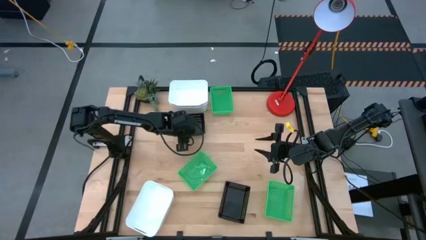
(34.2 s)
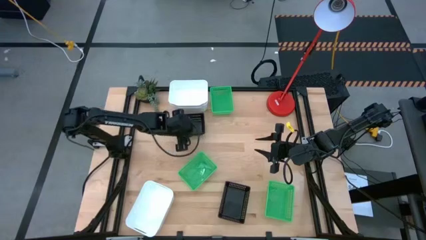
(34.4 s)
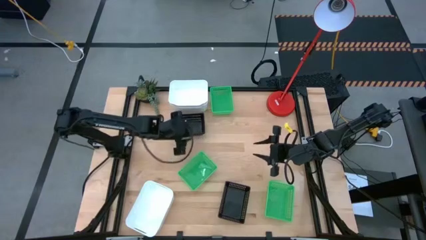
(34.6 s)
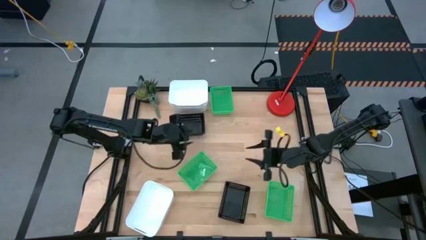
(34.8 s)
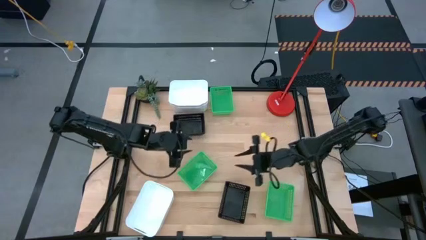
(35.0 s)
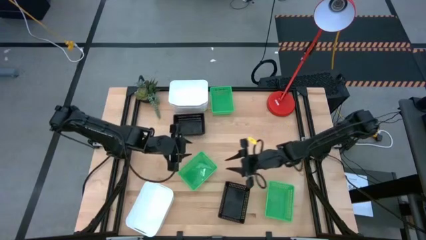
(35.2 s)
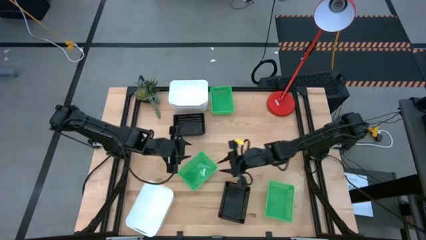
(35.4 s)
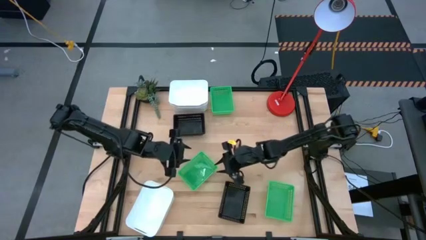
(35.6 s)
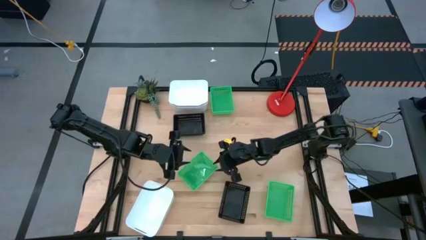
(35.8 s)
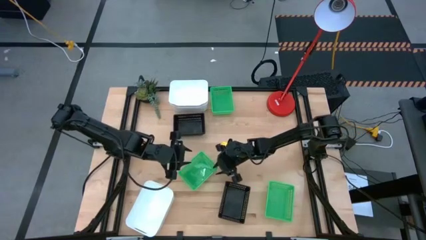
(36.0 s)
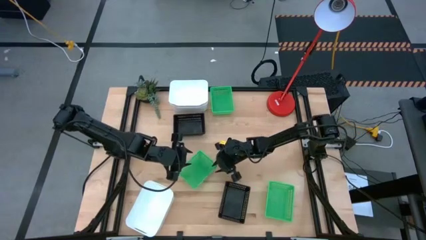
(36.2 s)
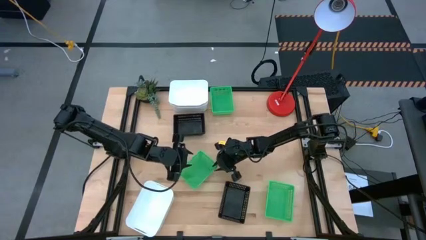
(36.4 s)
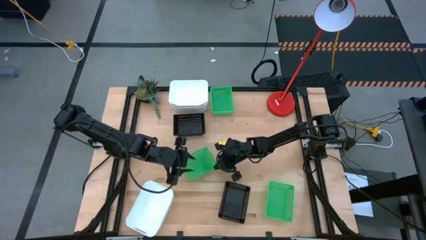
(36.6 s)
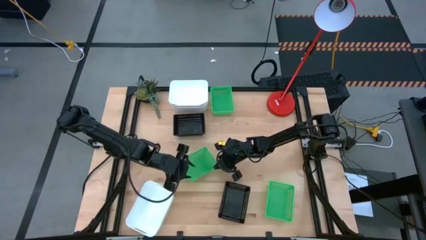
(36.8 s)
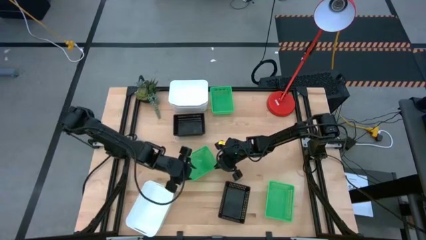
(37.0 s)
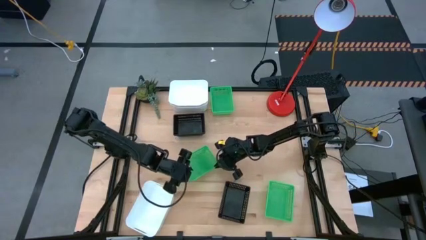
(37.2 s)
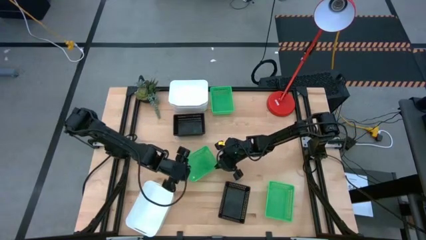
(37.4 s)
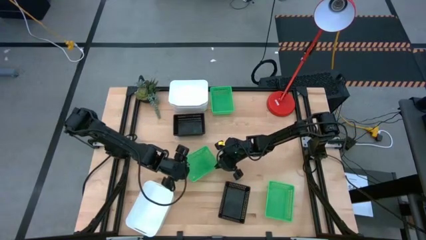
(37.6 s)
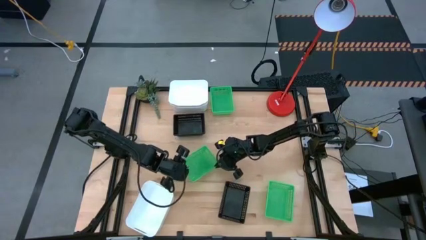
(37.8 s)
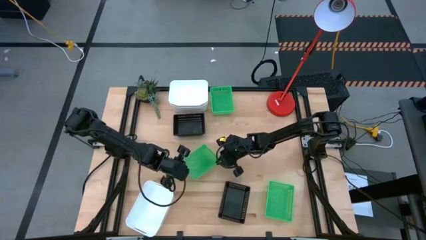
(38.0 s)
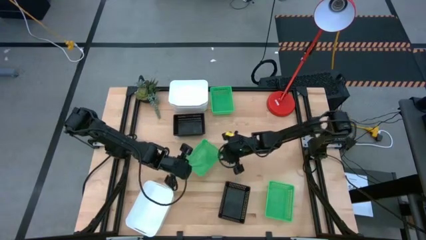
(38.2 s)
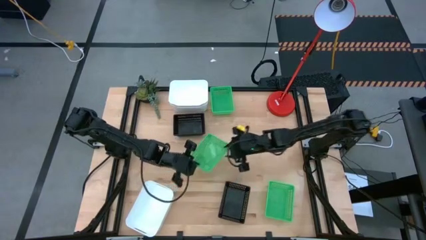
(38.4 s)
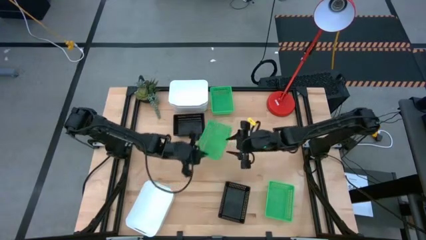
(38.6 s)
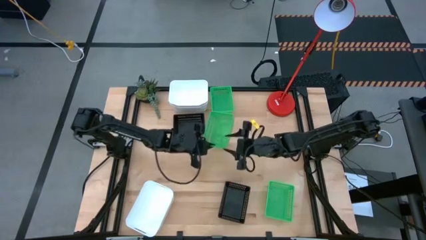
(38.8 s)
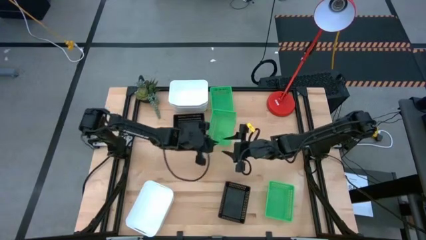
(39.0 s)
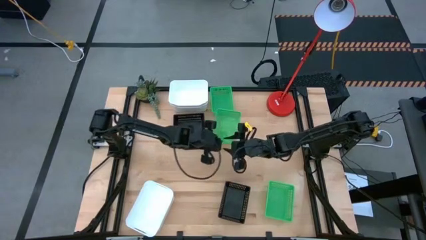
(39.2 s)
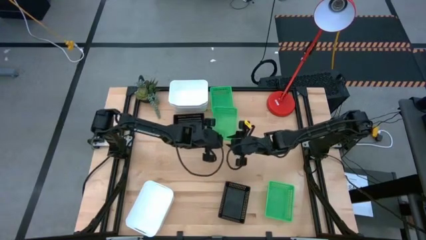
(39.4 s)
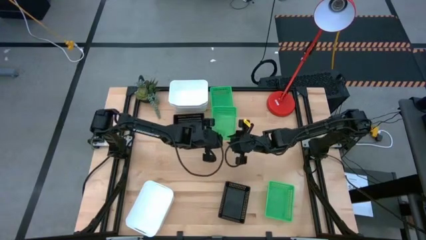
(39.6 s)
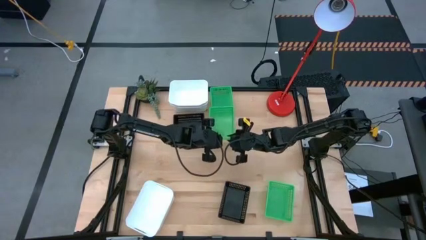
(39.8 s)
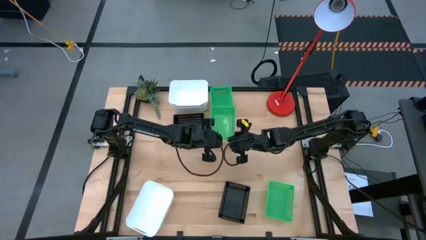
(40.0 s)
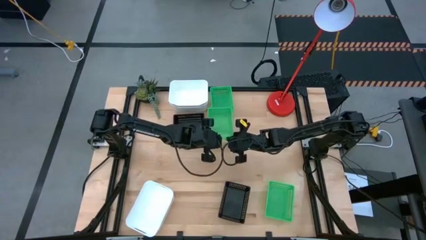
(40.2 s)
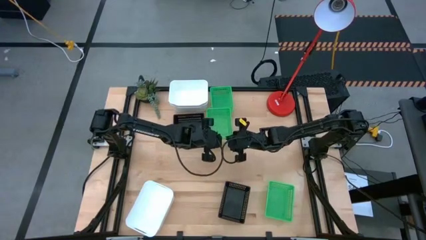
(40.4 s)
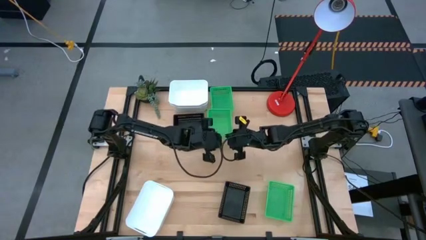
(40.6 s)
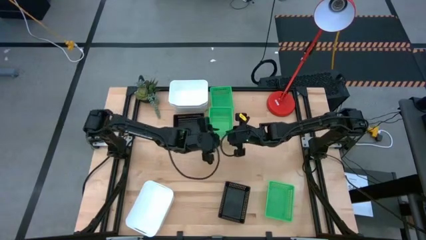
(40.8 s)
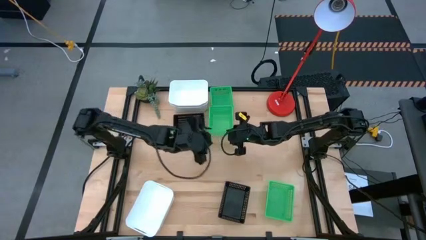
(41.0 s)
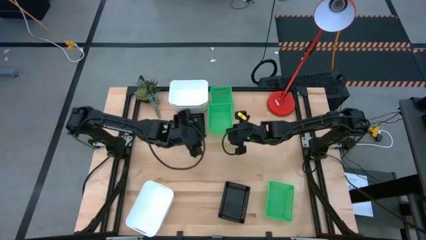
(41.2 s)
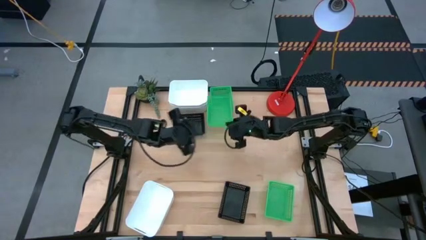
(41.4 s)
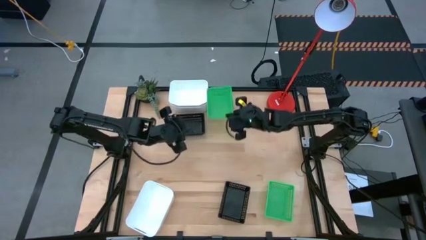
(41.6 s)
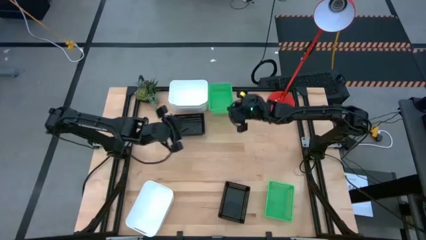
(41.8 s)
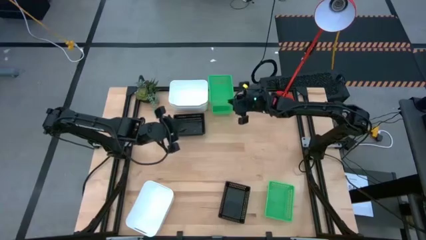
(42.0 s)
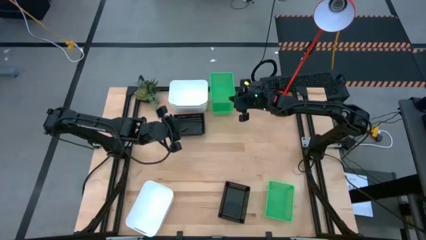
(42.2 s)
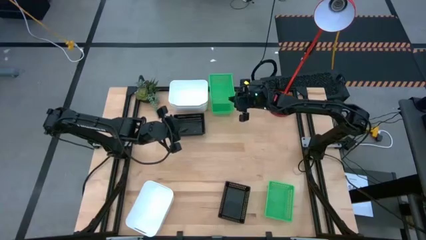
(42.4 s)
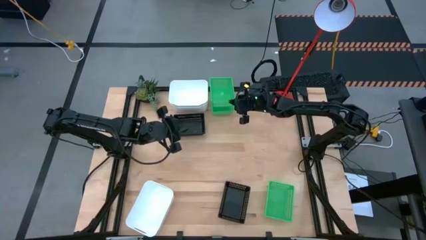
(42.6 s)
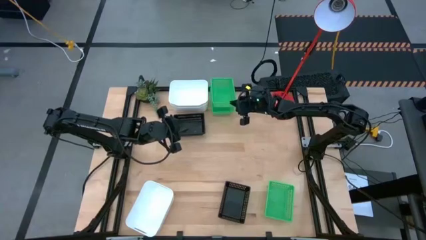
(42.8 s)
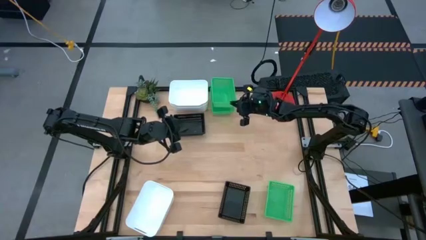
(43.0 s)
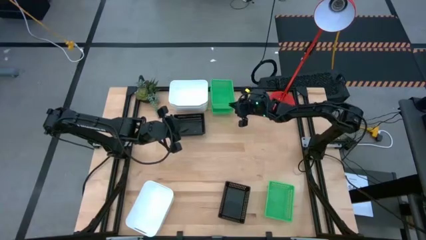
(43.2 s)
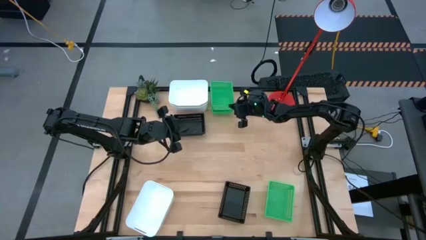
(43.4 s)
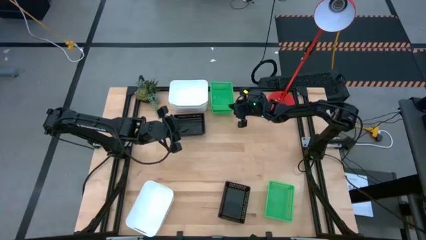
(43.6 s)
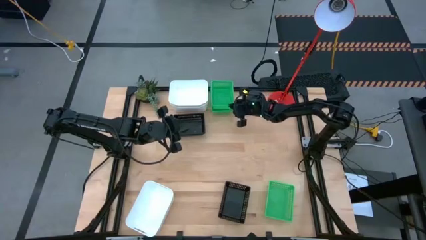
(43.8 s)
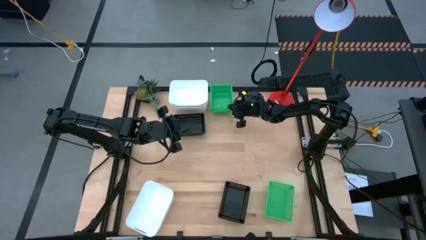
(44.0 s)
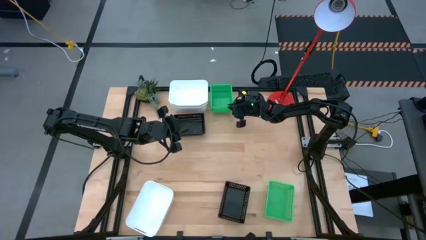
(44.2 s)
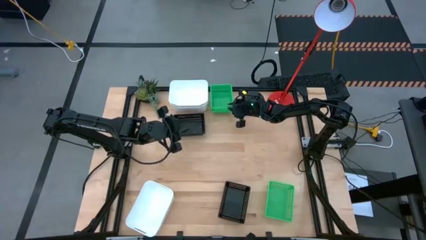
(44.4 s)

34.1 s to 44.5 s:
Stack the middle green bin on top of the the top green bin
